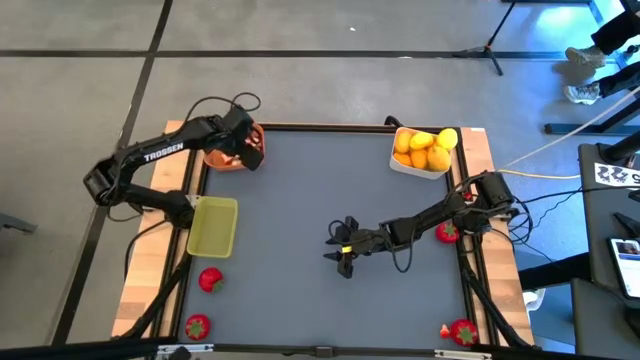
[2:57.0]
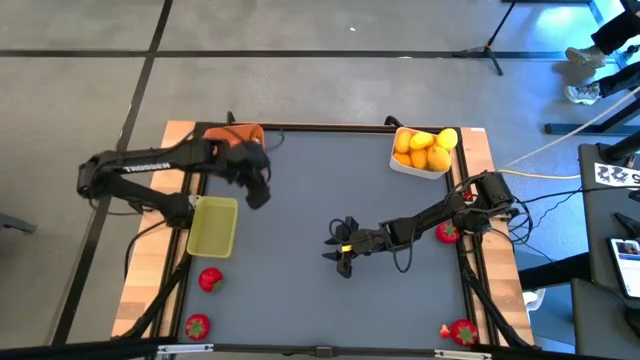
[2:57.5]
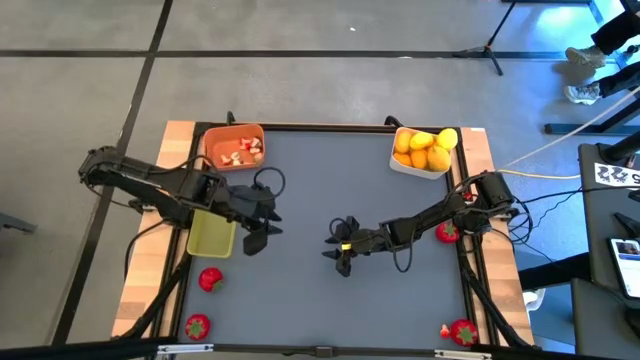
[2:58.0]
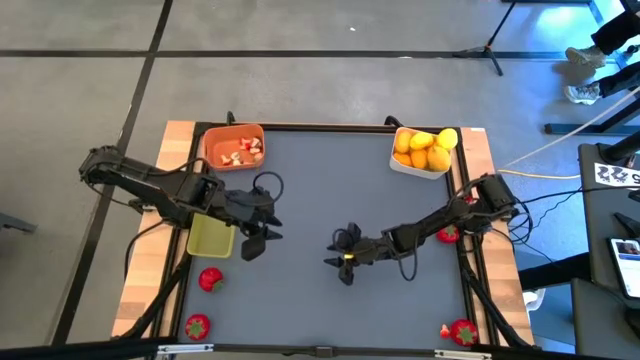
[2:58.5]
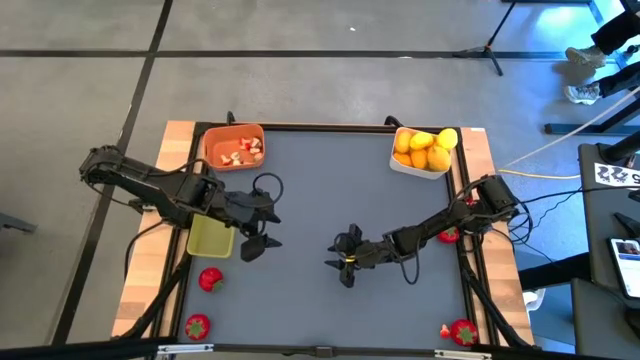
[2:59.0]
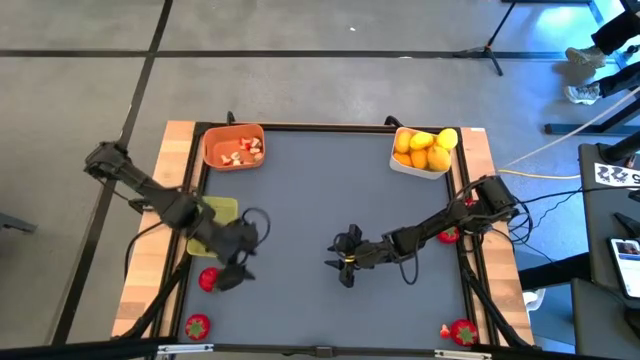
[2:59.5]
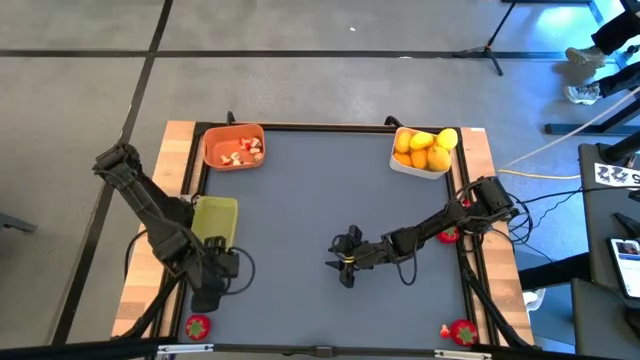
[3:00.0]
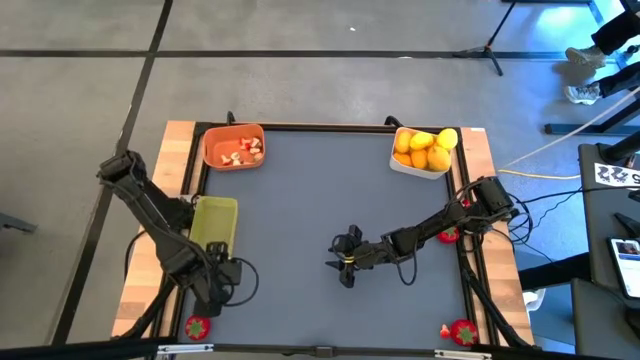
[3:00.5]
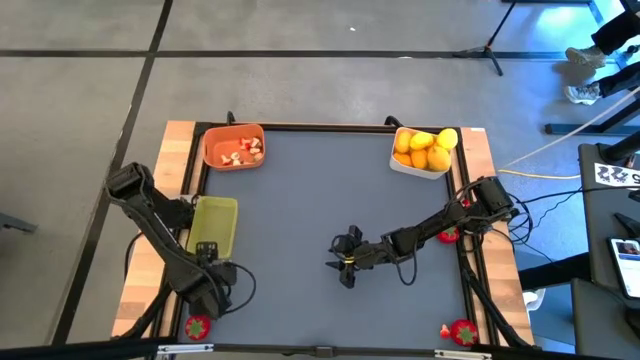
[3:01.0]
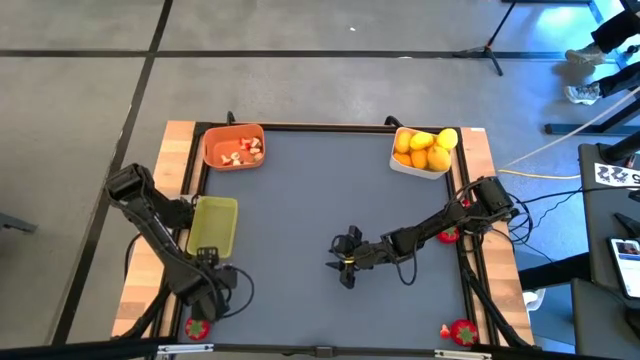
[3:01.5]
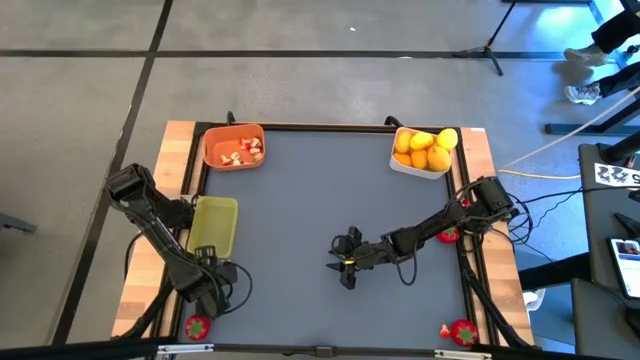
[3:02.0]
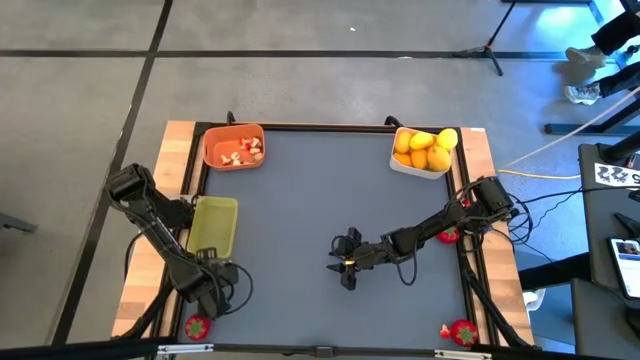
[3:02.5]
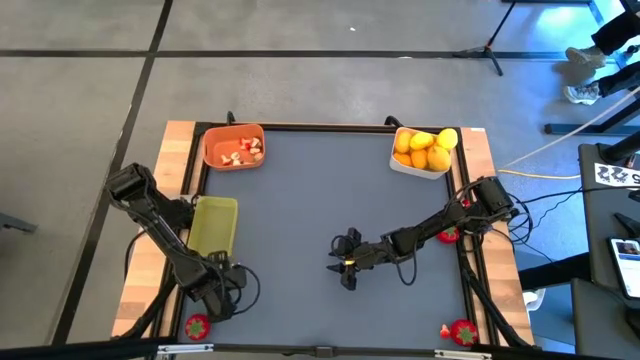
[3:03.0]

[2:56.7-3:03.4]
Task: Sort produce into baskets
Put the red tomato into the yellow bin

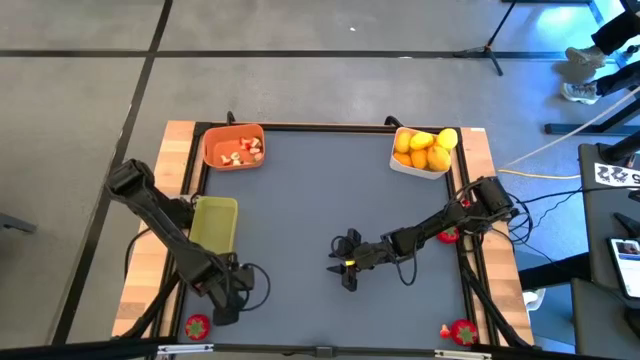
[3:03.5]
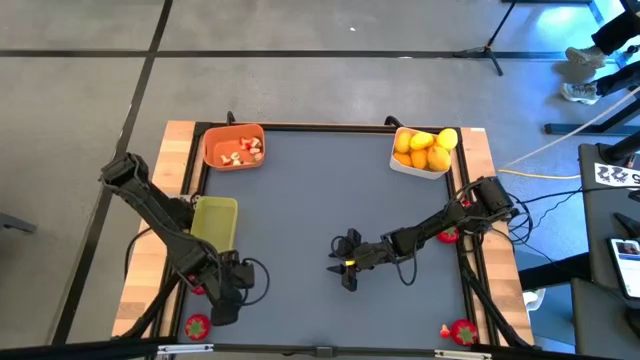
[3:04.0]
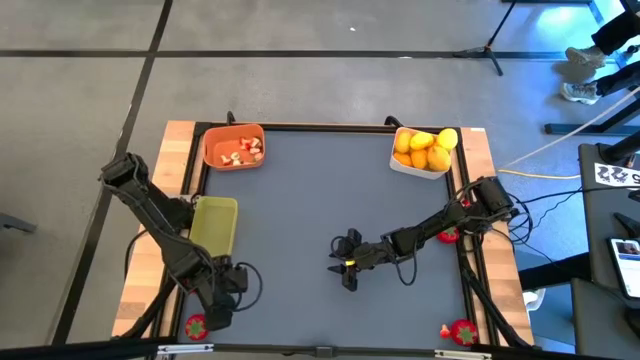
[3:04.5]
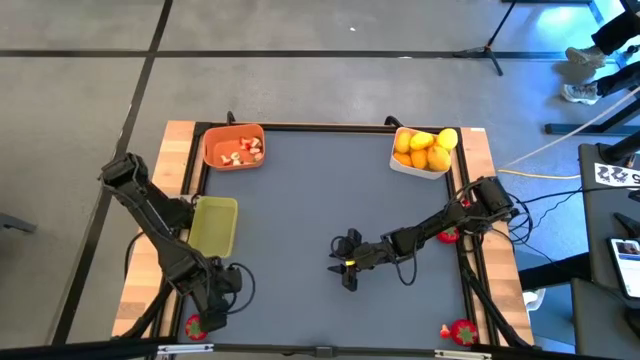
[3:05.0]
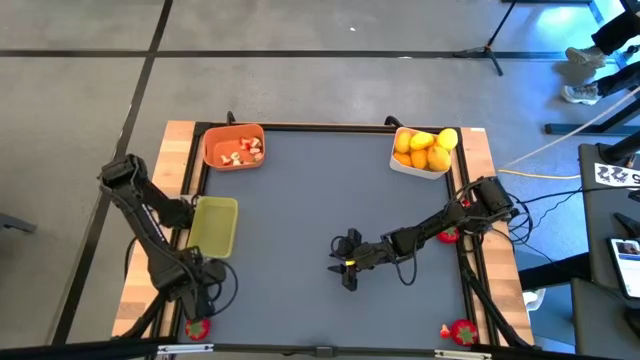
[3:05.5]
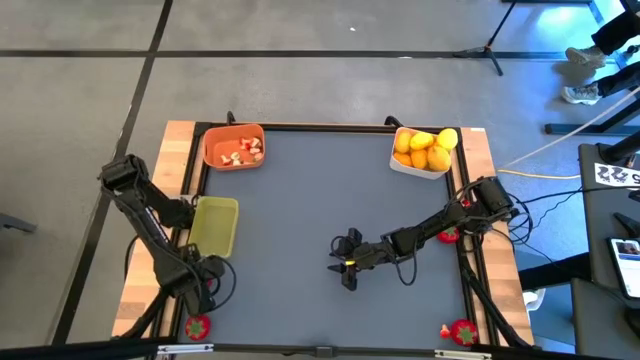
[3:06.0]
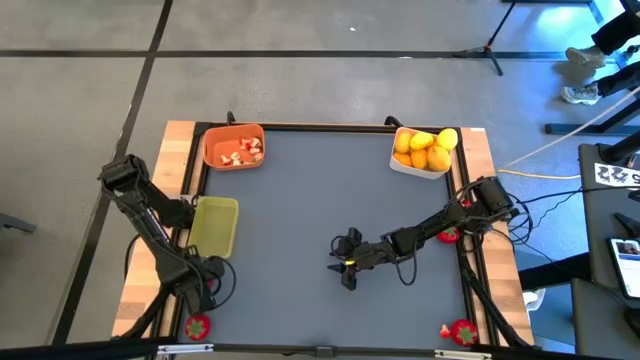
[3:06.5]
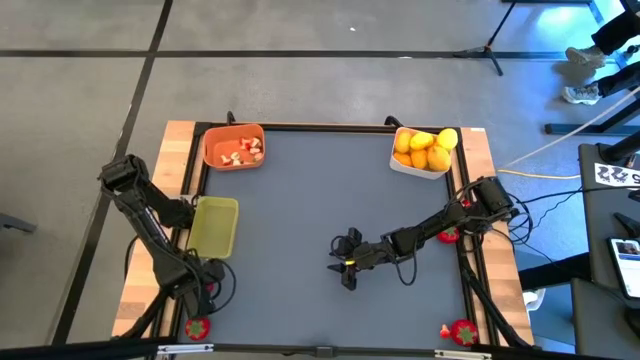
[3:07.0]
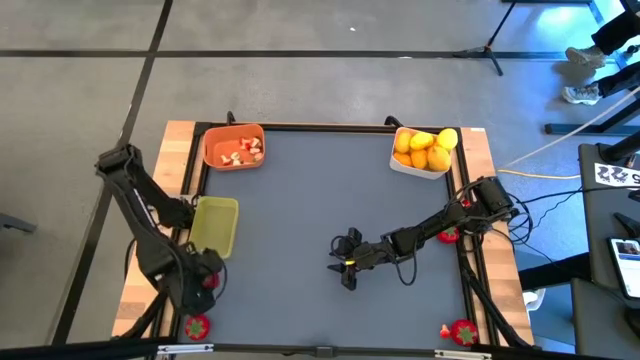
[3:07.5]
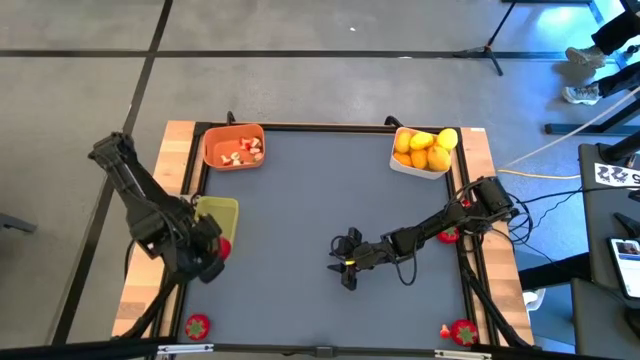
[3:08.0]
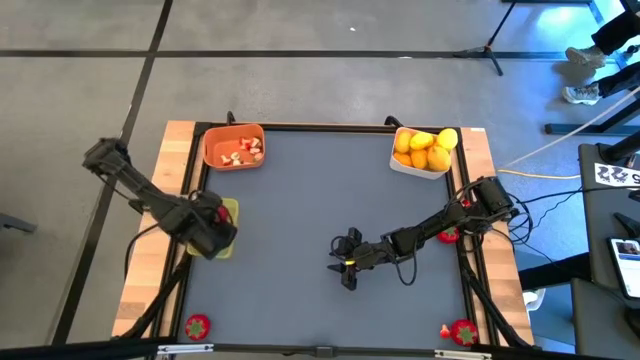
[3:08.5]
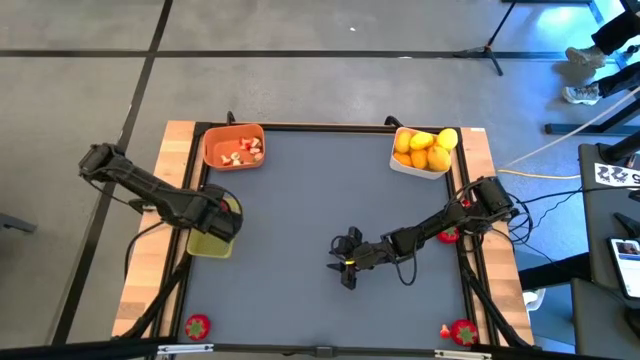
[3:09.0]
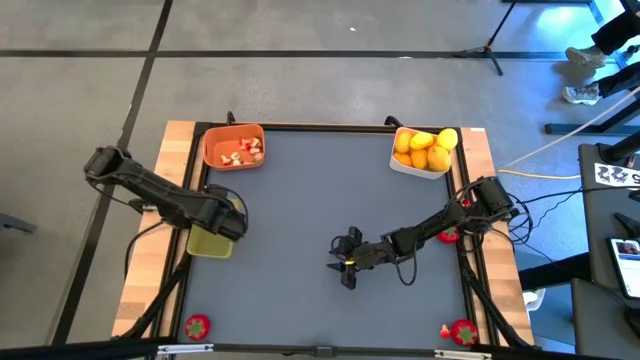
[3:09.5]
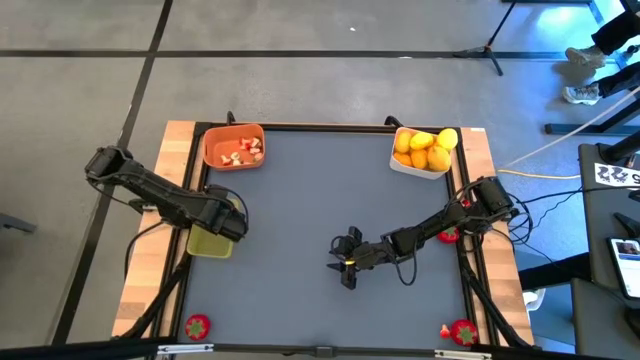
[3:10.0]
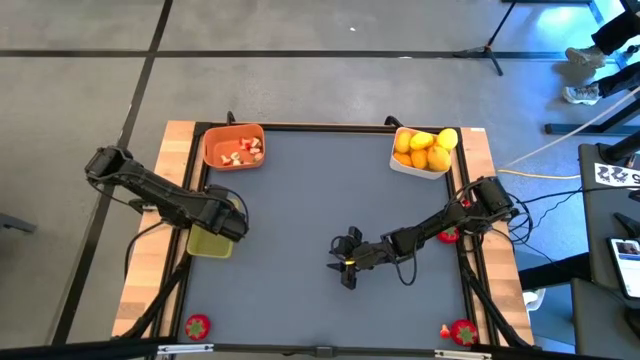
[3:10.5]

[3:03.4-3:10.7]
Put the red tomato into the yellow bin

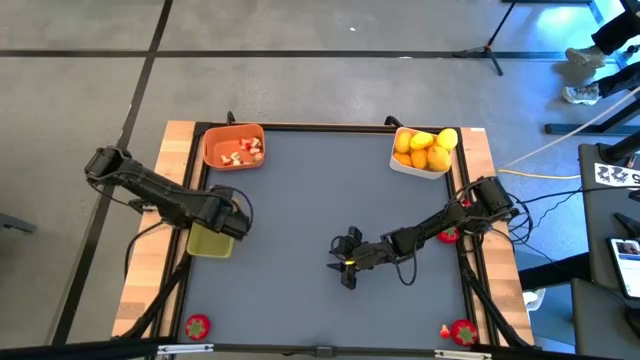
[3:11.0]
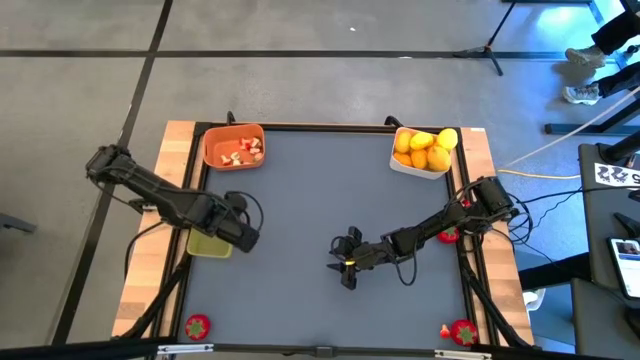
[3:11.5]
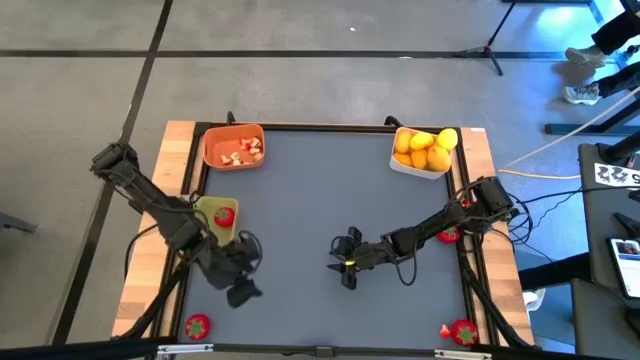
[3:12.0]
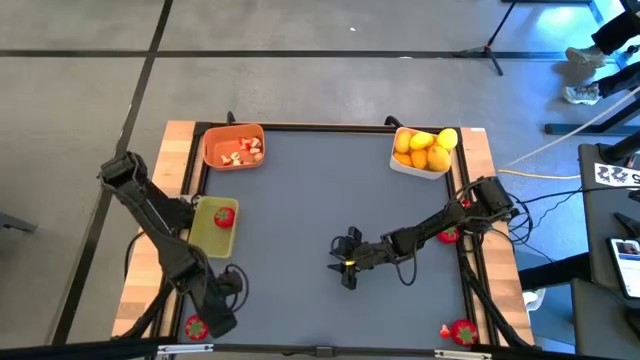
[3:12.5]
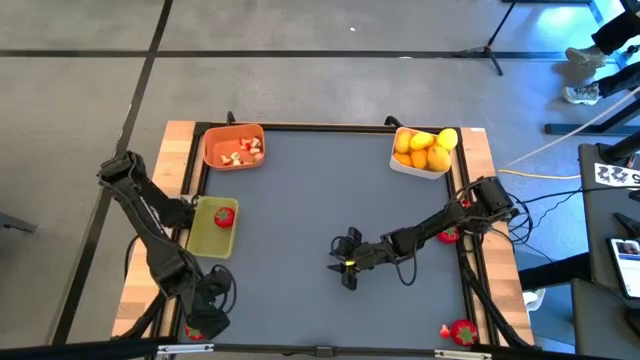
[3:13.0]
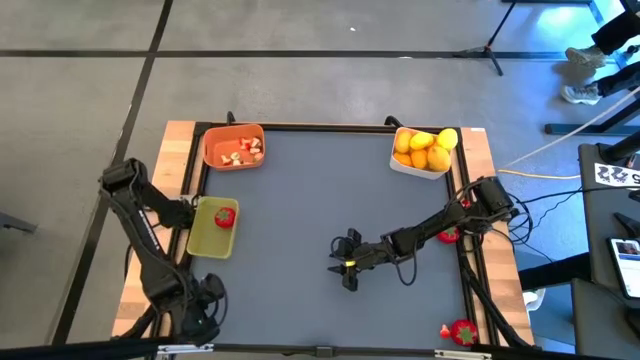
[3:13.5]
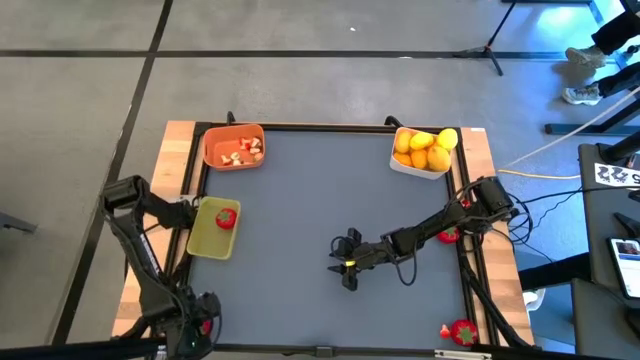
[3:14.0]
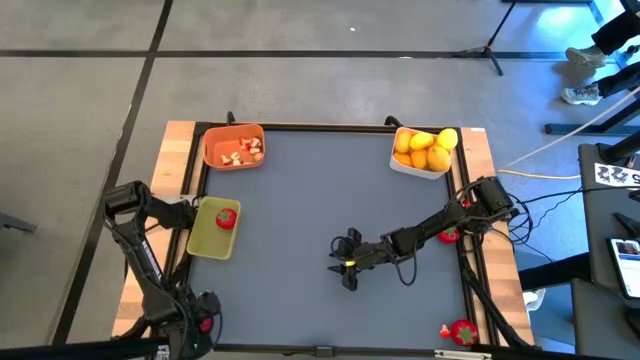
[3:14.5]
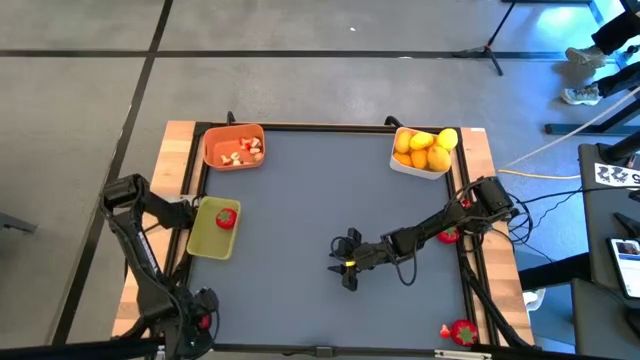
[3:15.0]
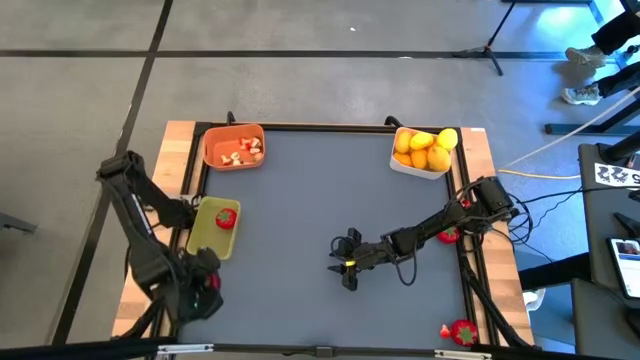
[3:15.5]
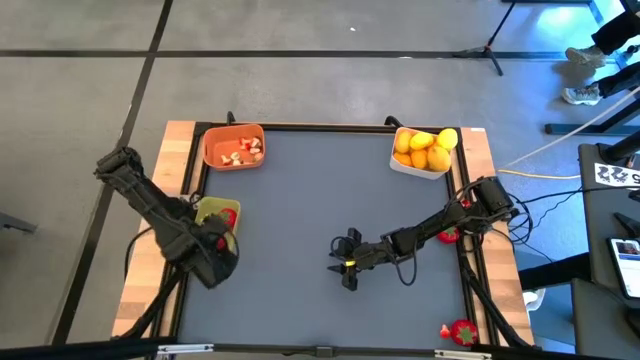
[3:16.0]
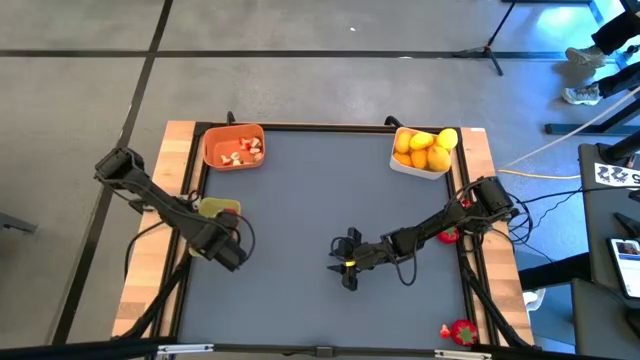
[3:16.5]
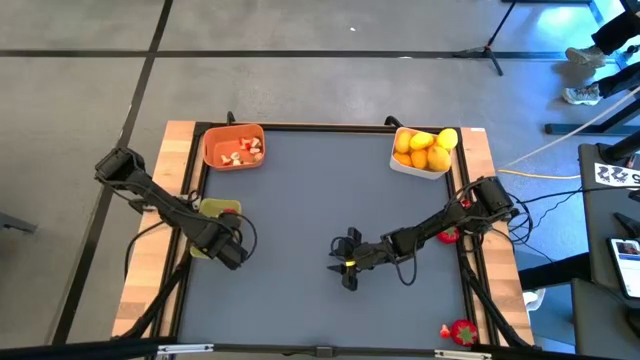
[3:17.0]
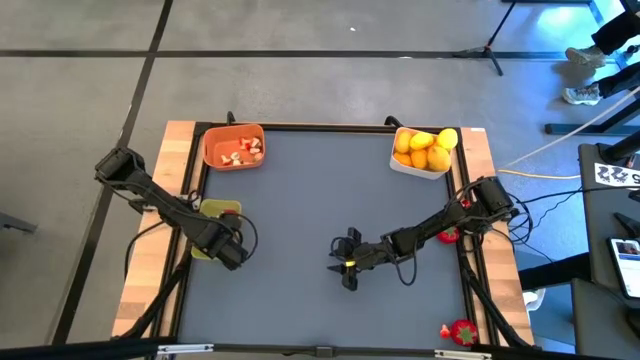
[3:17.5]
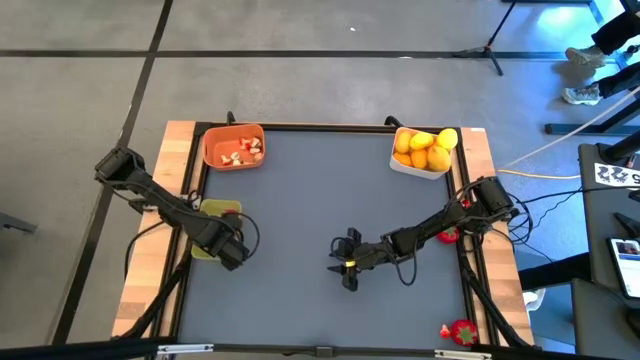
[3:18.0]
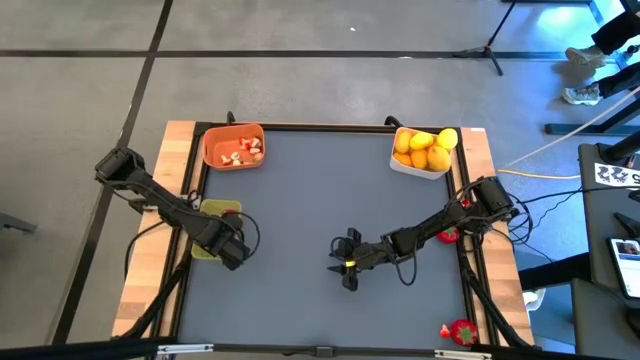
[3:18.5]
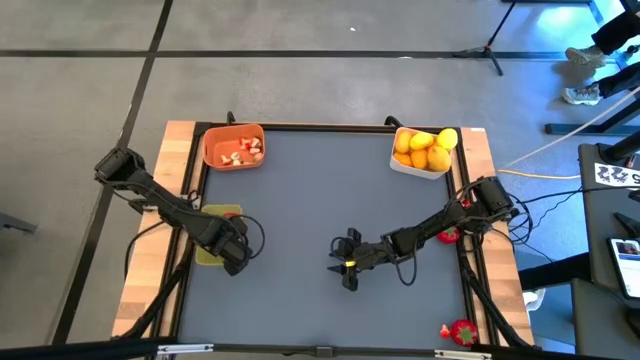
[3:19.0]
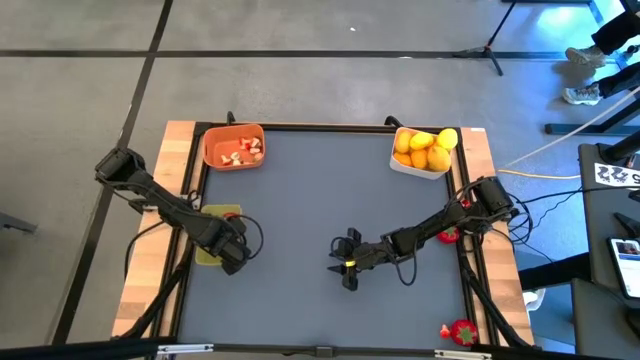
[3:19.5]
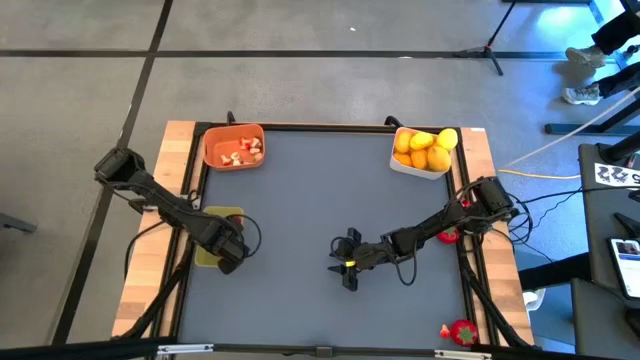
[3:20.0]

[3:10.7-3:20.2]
Put the red tomato into the yellow bin
